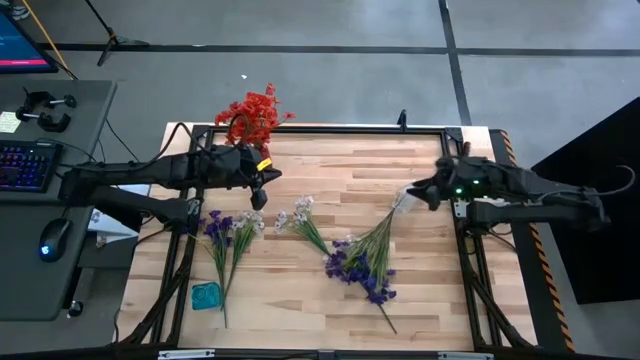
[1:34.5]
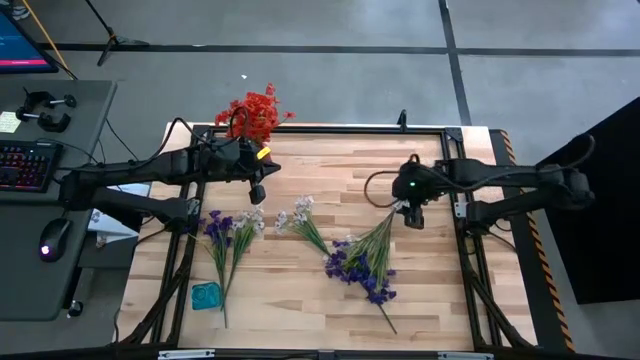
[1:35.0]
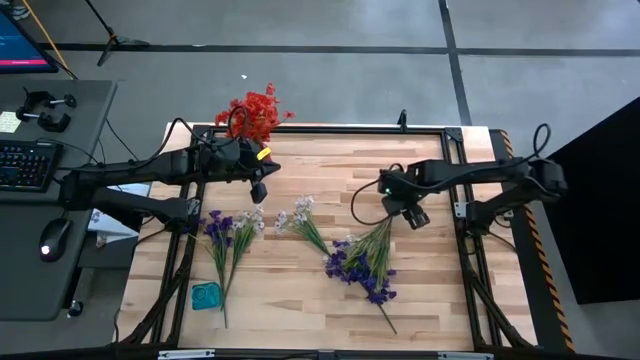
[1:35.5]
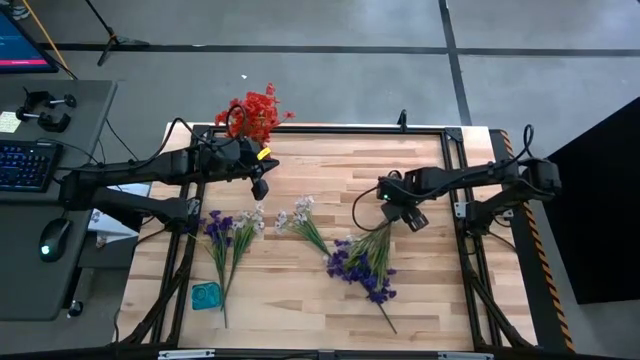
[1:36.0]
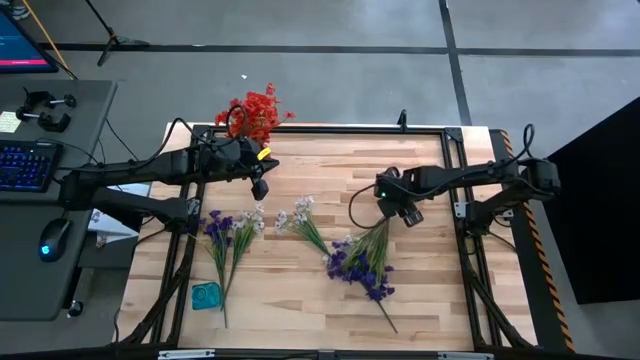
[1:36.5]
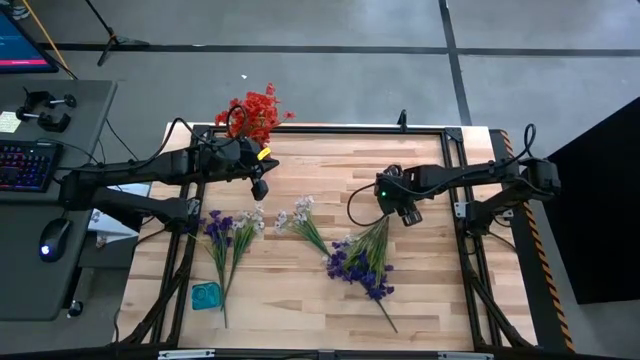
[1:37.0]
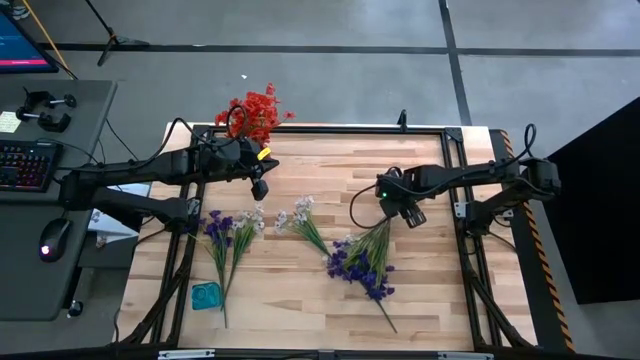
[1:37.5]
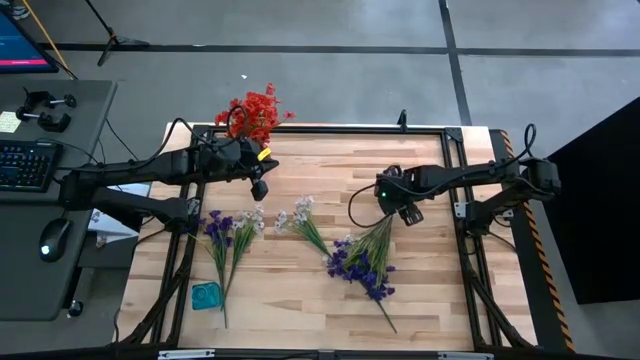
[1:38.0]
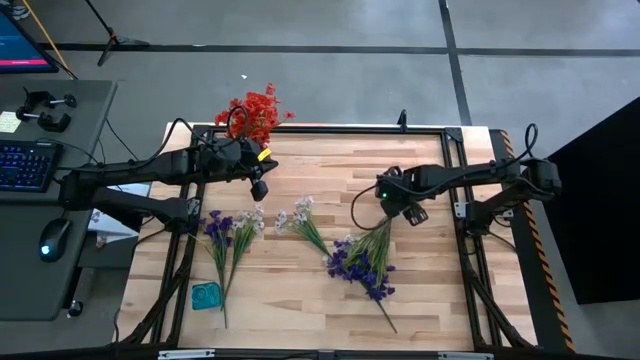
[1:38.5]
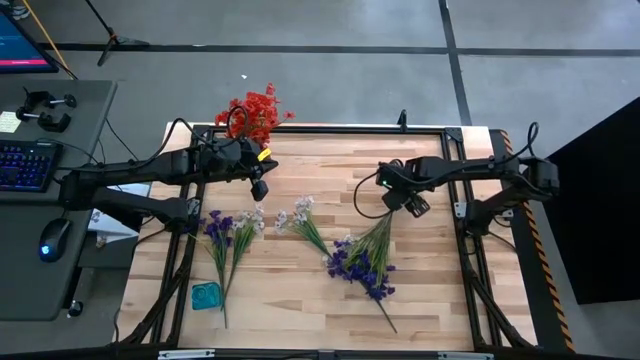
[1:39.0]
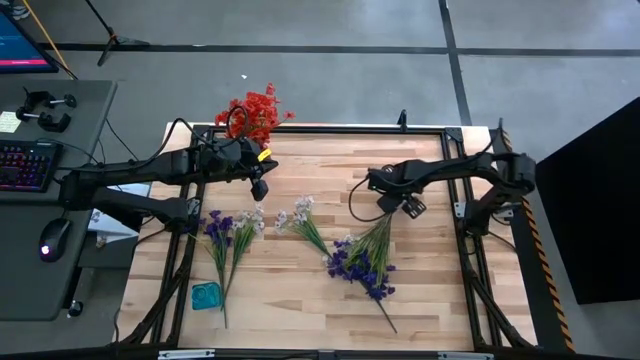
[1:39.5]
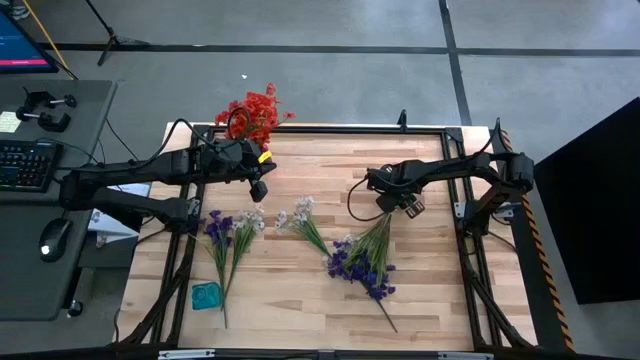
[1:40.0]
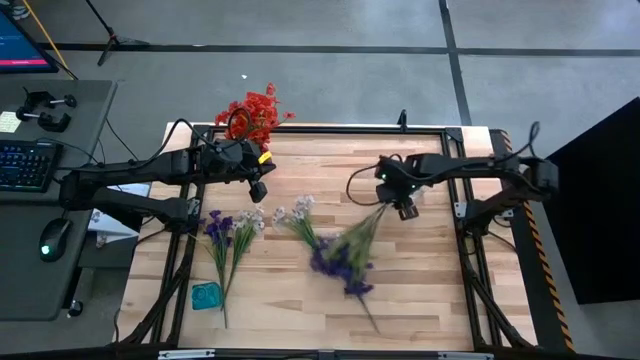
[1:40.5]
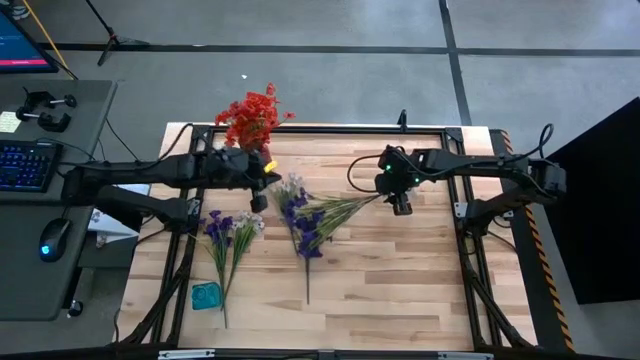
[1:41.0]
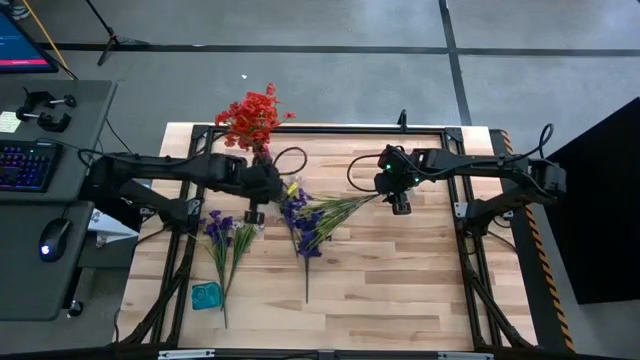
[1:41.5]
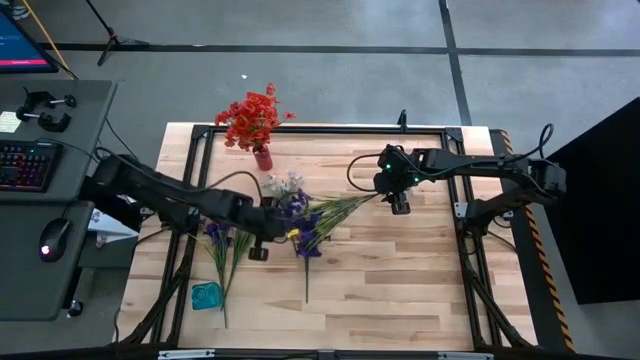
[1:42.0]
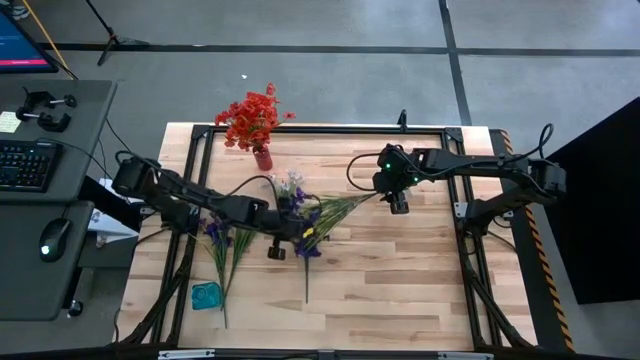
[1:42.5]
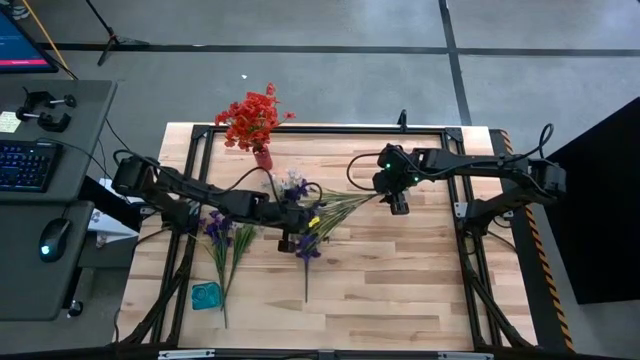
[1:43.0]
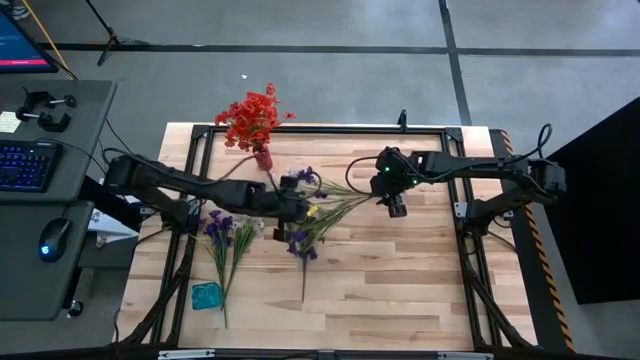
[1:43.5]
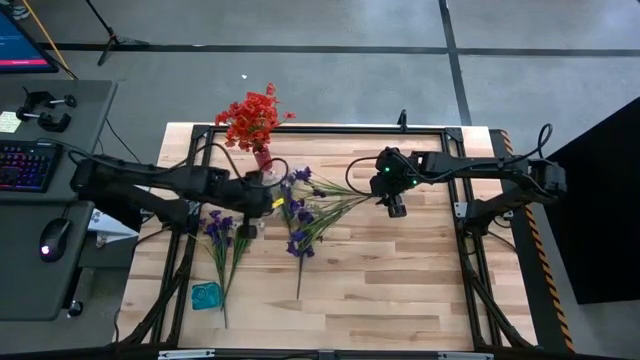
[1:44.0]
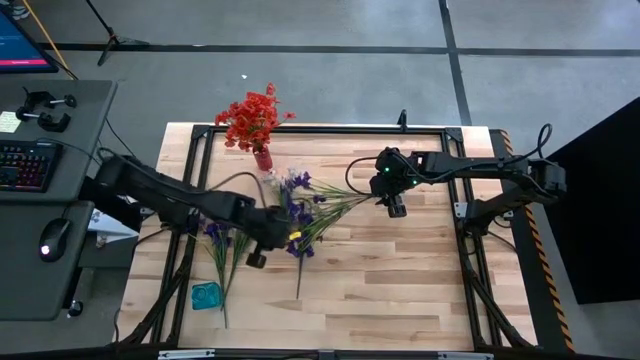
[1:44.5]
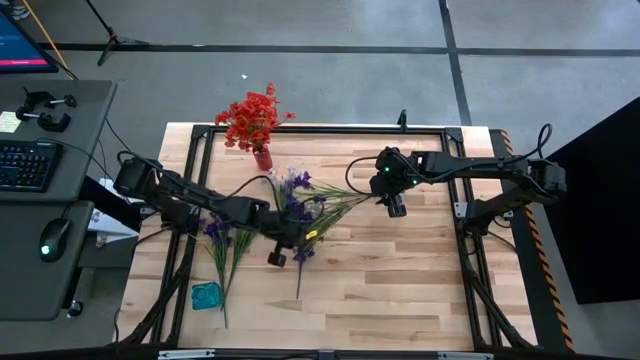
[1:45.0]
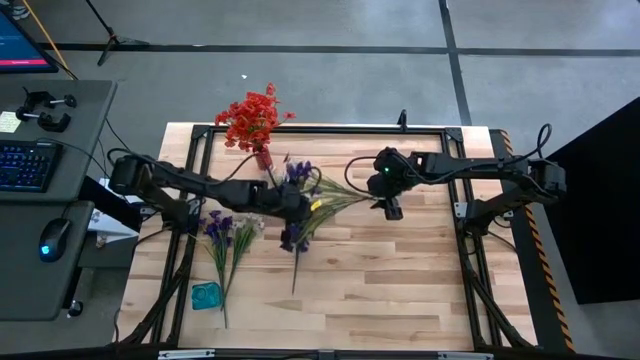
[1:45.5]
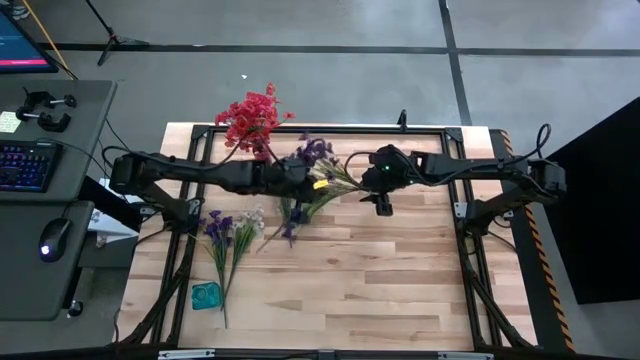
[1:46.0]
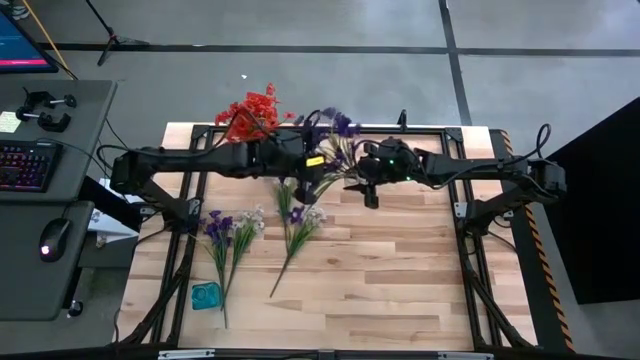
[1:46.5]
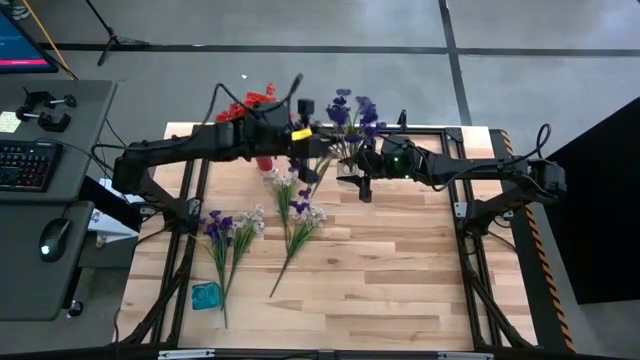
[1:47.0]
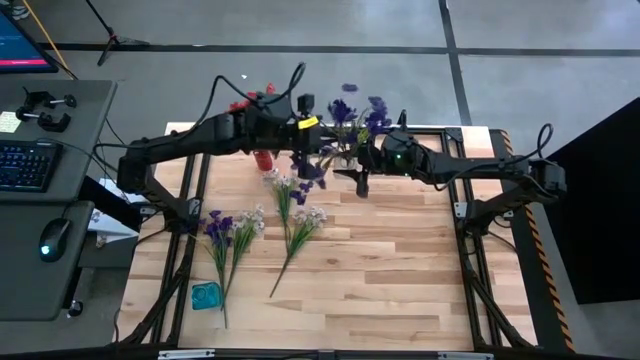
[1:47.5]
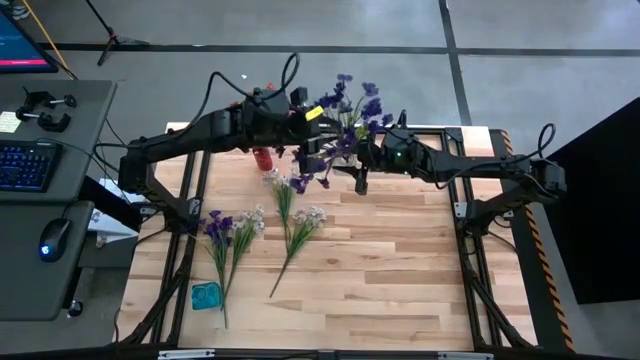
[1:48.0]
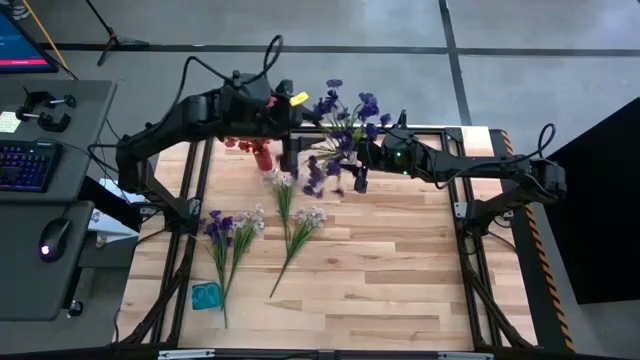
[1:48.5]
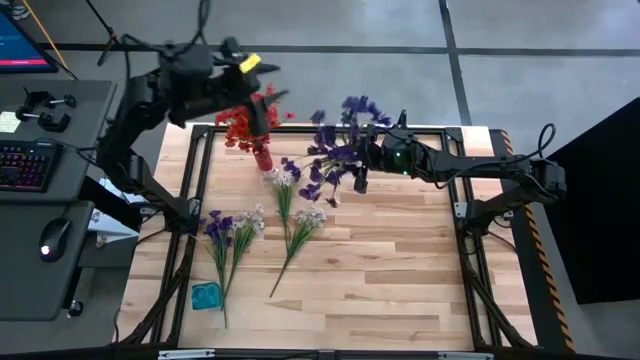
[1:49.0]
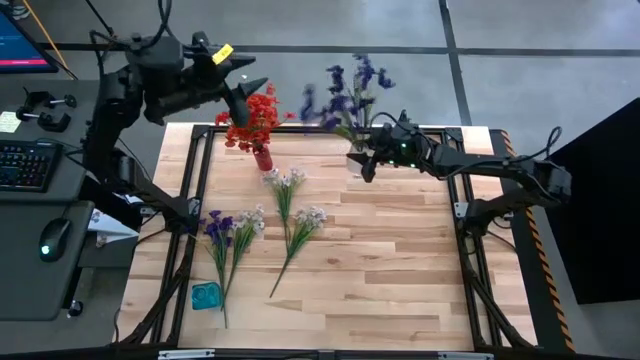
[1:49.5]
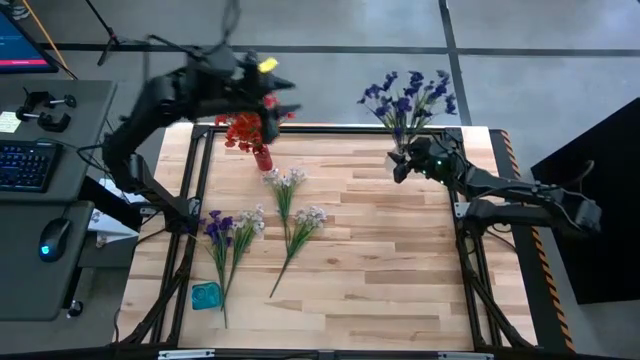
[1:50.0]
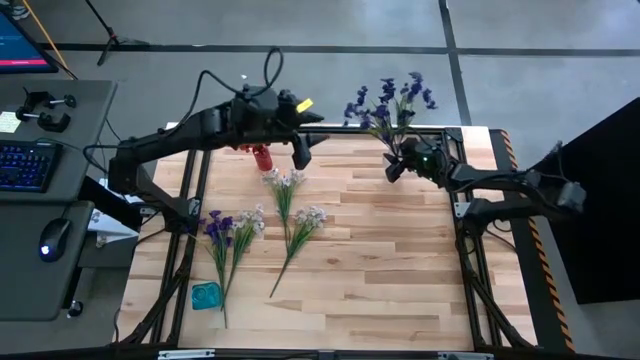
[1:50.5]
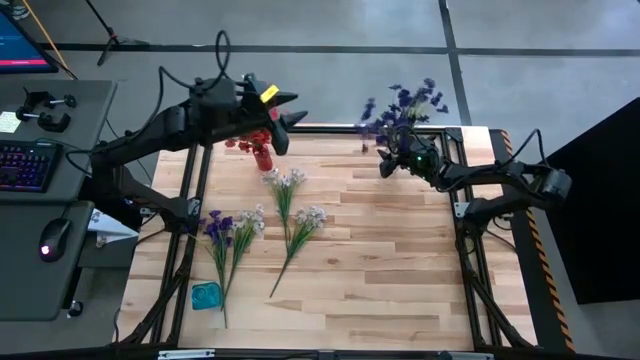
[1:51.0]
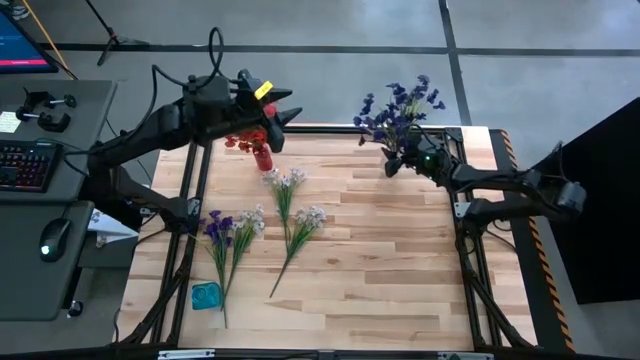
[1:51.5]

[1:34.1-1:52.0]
Task: Sort flowers into vase by color
Adjust the transparent vase

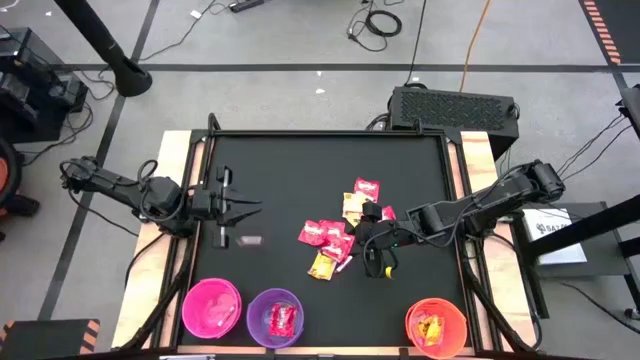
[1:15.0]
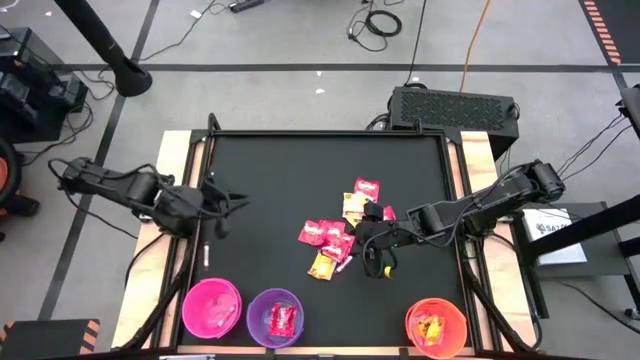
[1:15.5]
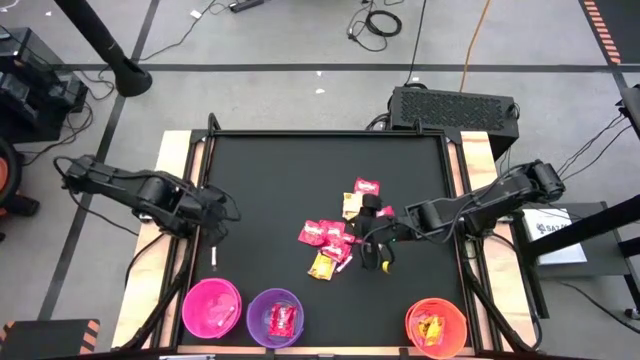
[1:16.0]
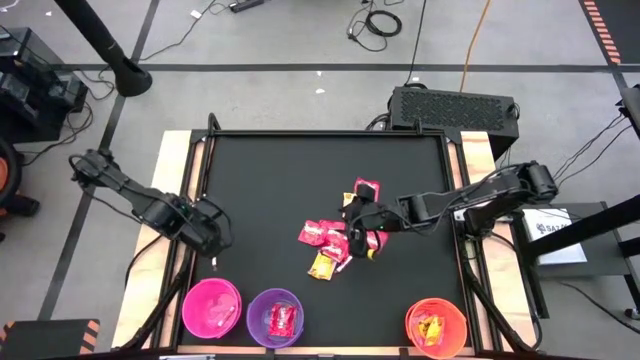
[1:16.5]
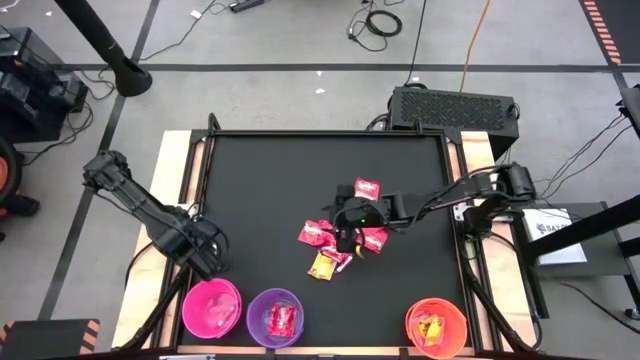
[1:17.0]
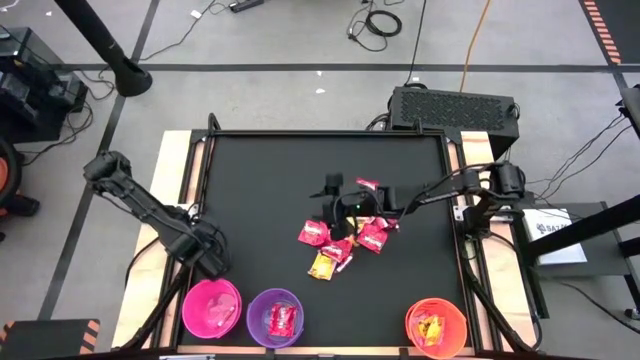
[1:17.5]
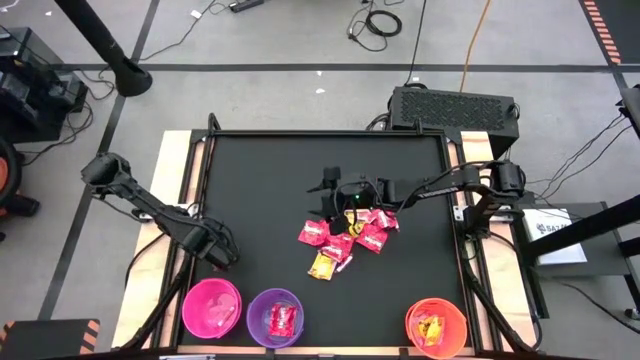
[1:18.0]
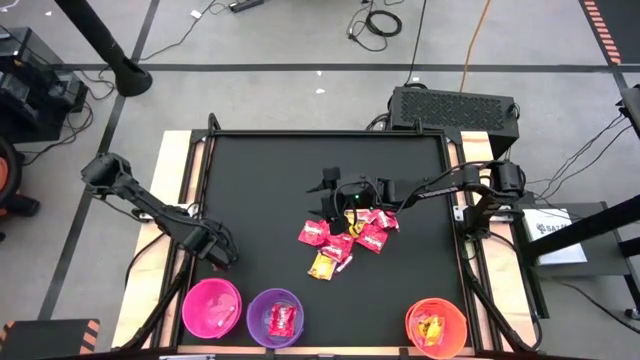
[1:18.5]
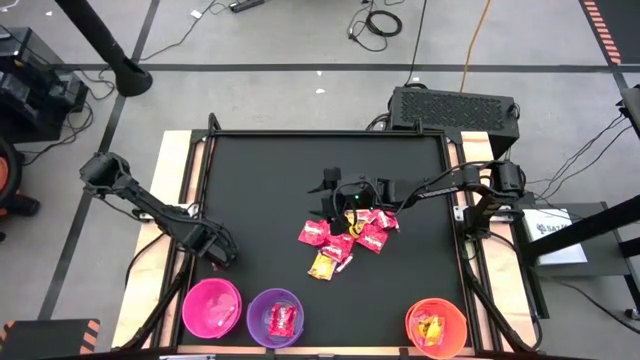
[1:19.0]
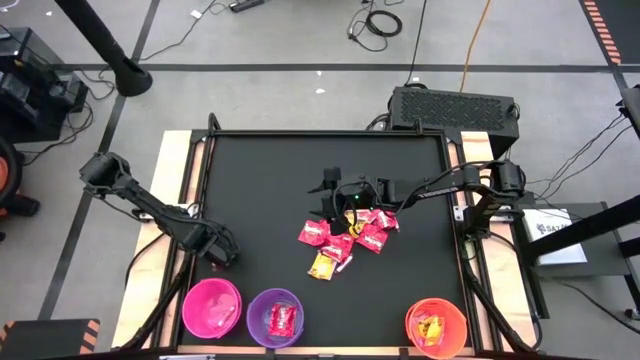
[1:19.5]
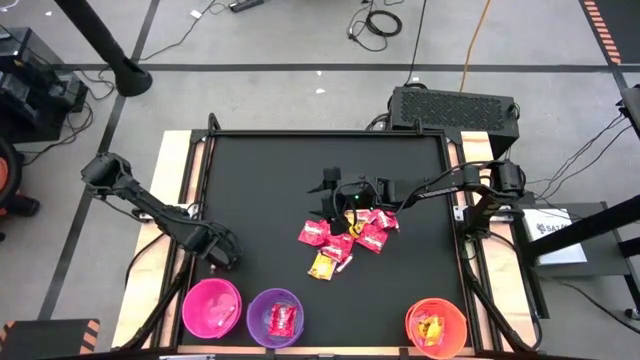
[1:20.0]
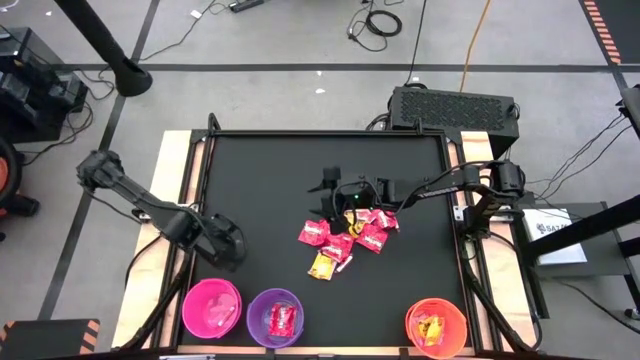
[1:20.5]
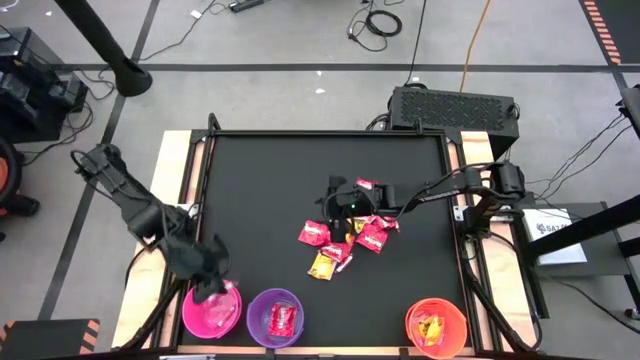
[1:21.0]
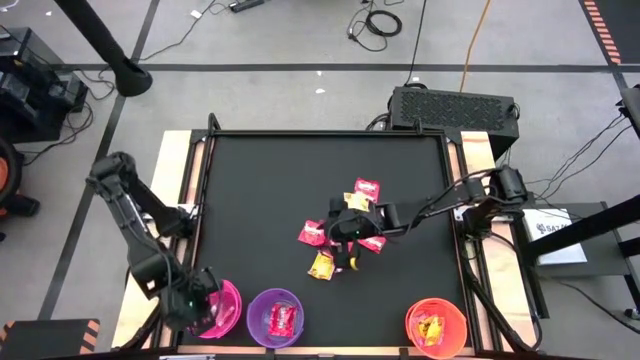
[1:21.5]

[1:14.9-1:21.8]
Task: Sort candy by brand, put in halloween buckets
Put the orange candy into the pink bucket
